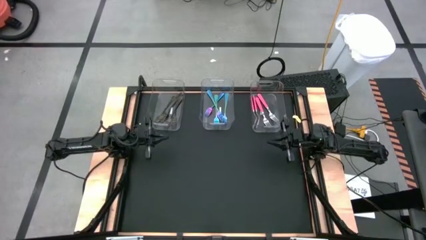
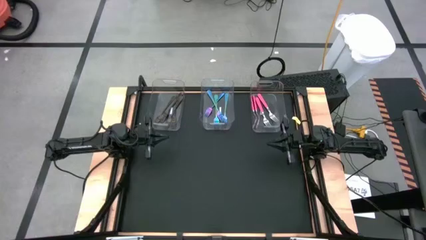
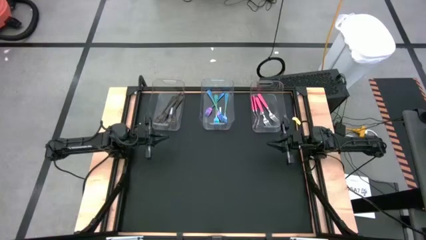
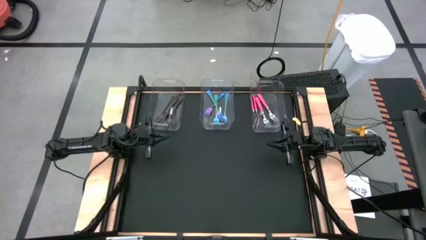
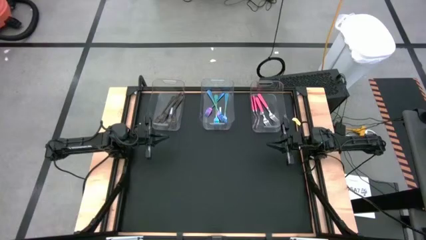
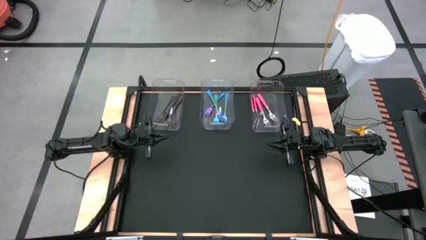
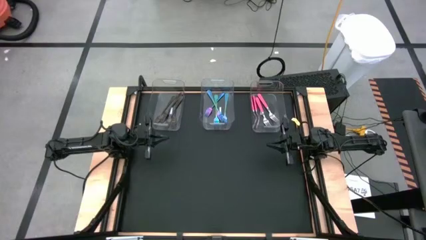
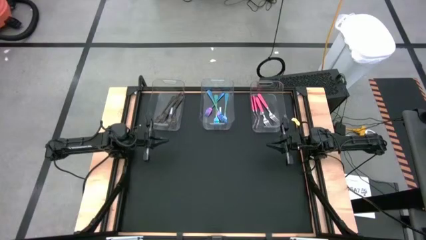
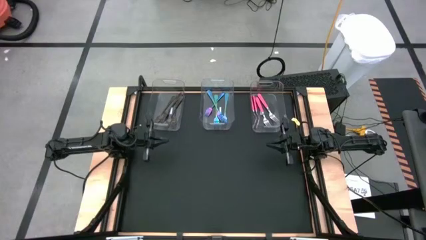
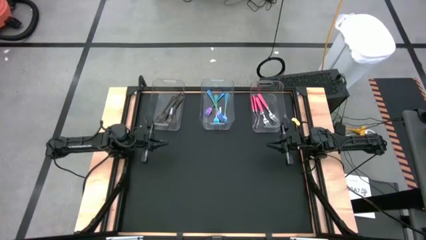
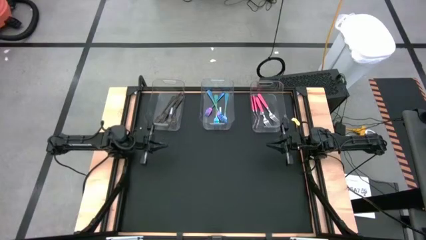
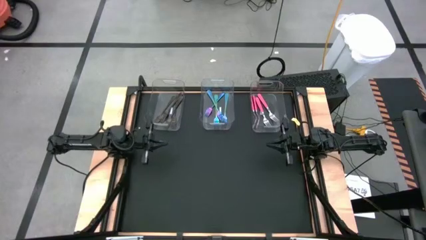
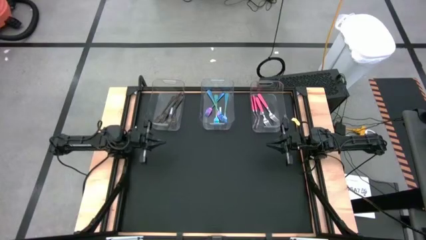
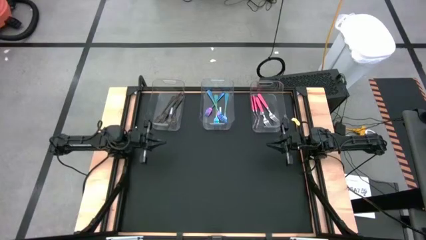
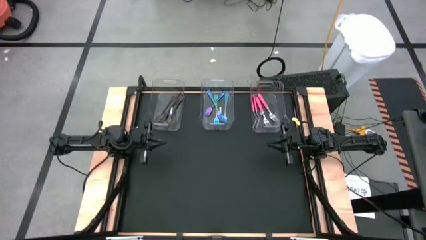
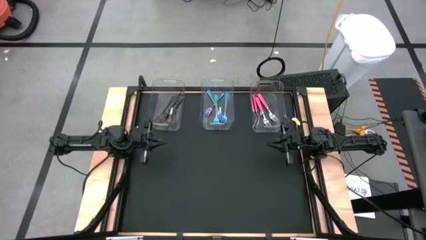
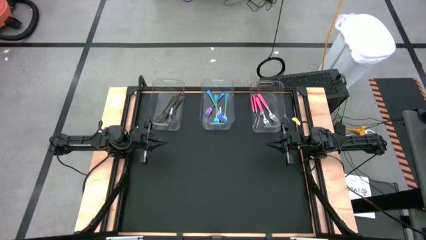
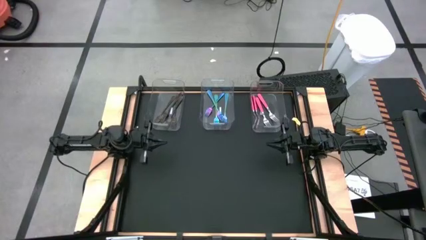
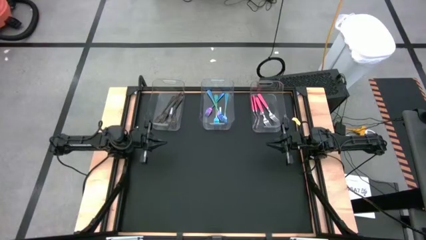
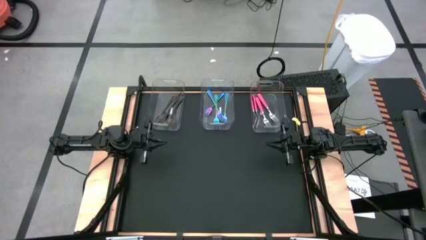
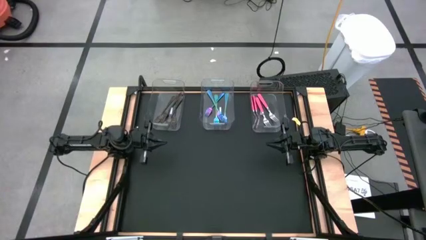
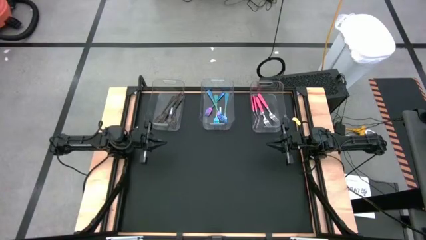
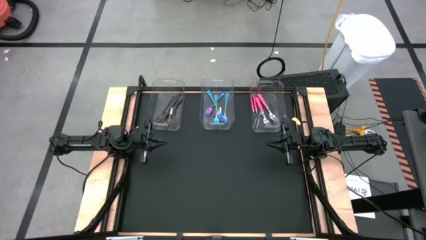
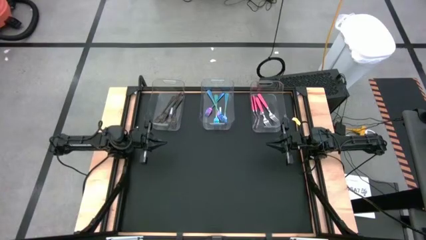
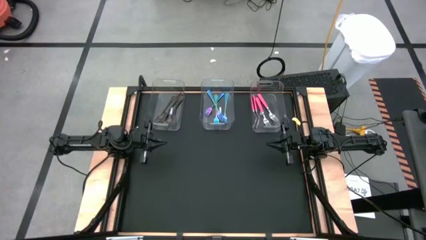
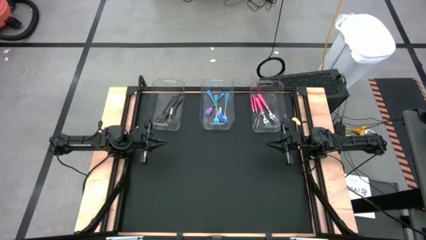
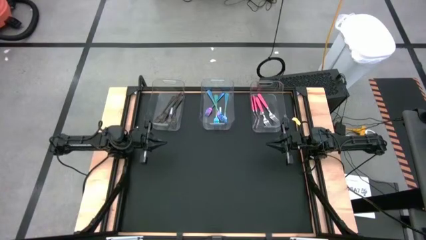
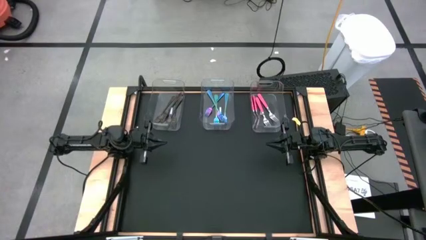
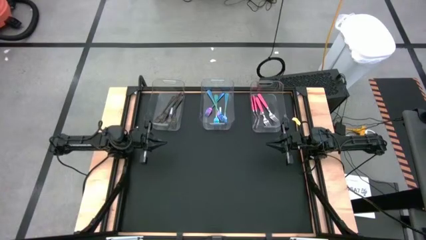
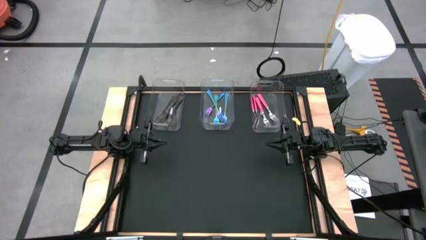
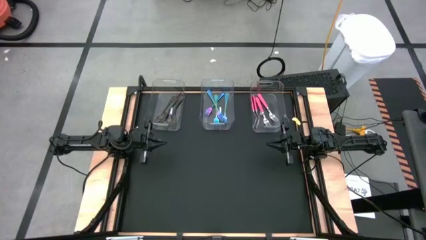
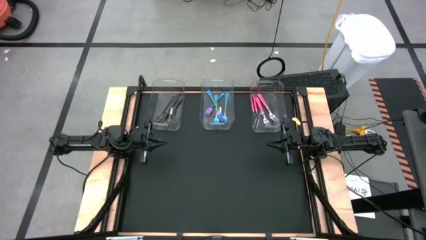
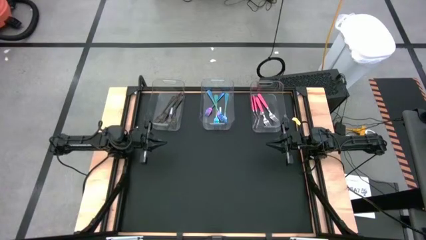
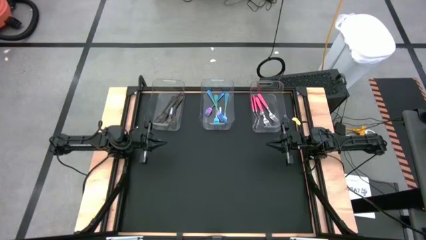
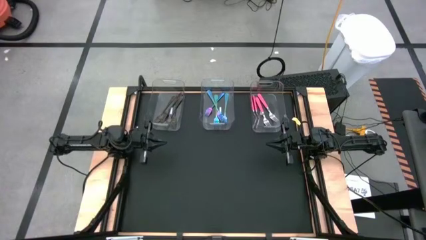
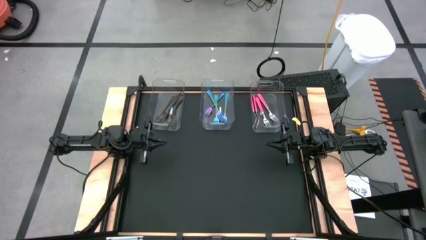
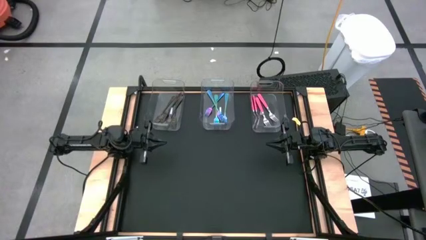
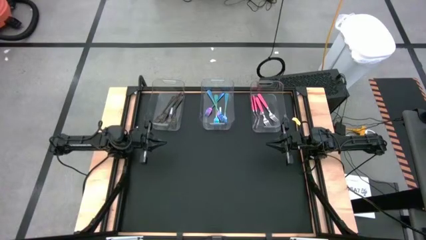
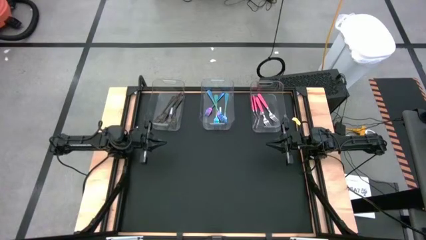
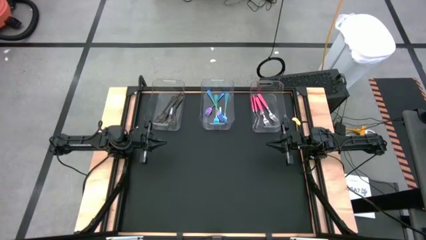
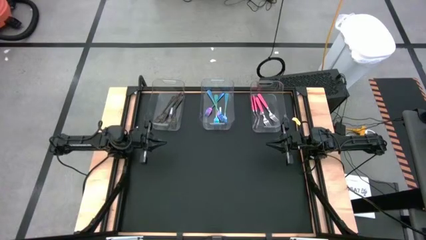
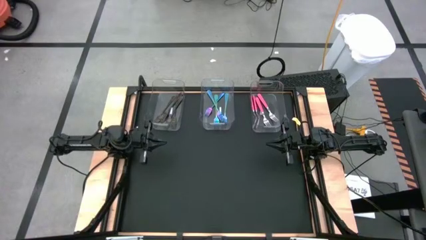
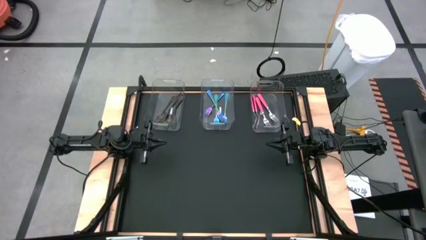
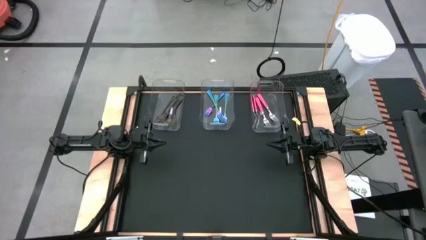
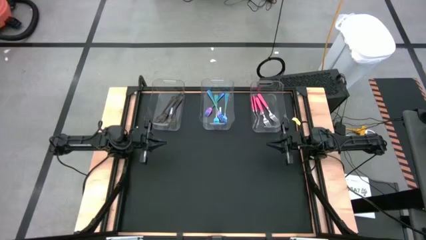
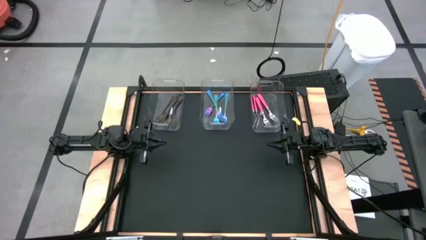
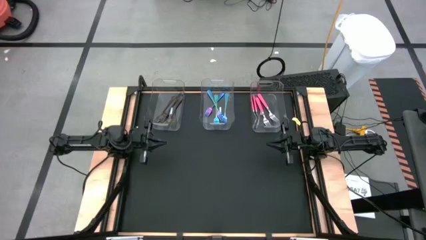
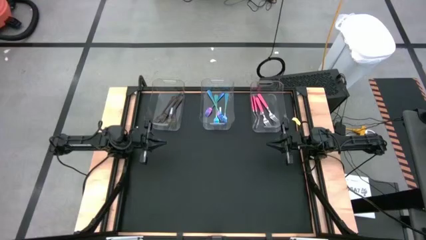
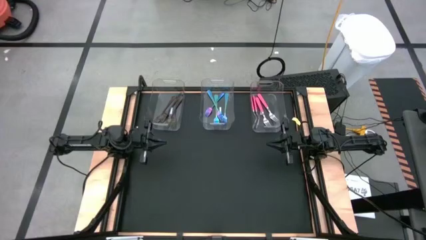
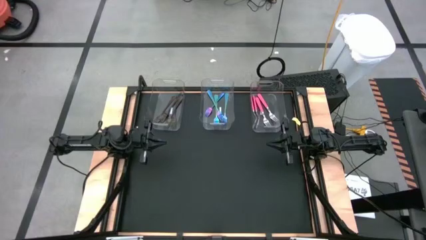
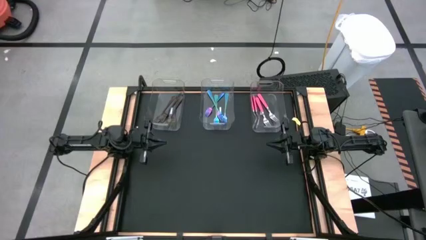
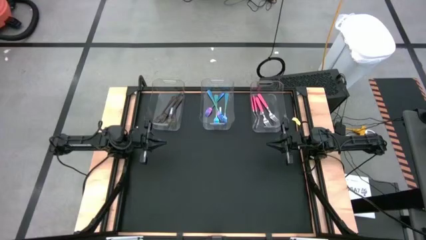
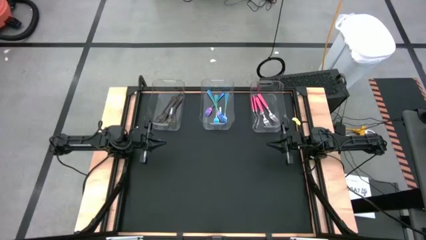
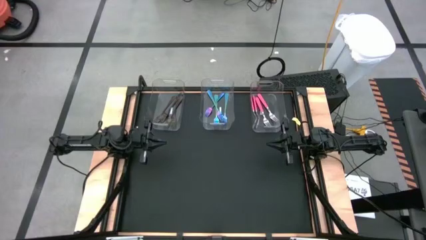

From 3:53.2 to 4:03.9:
Task: Sort silverware by color (type)
Return to Home Position

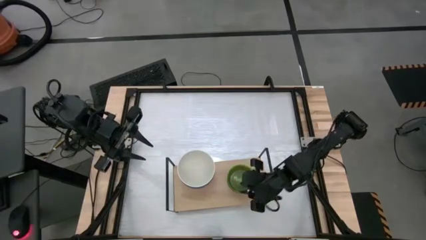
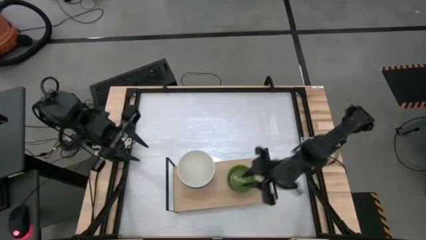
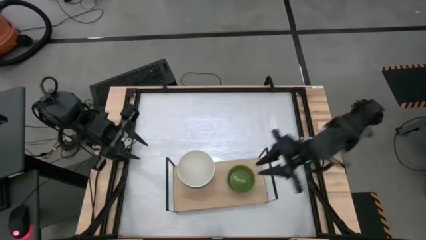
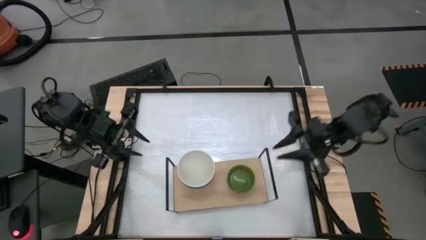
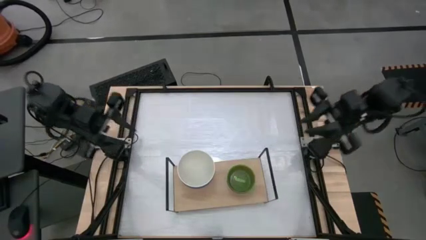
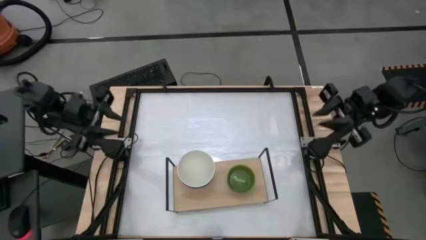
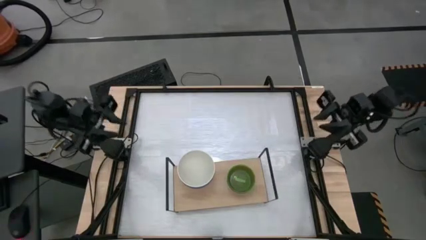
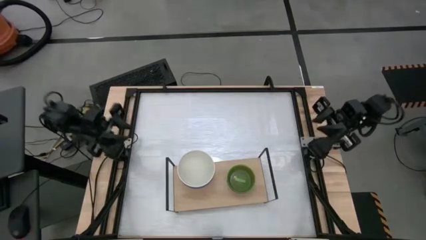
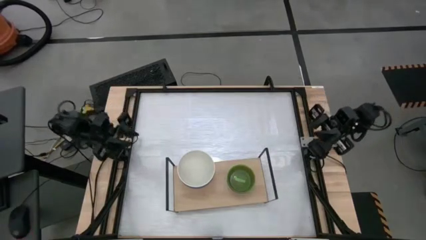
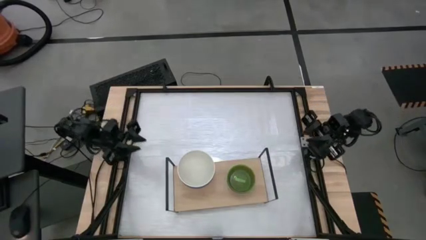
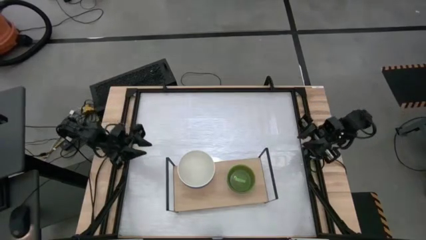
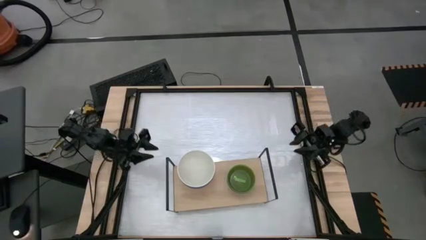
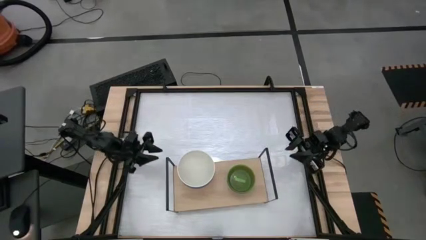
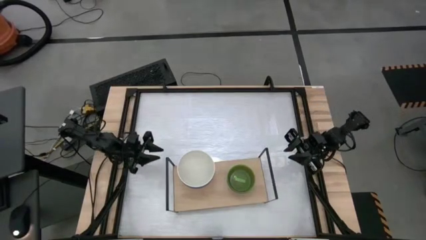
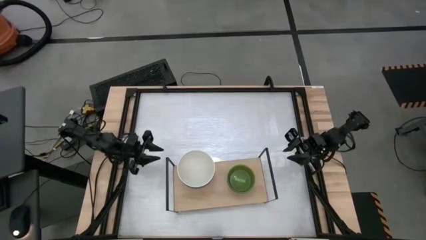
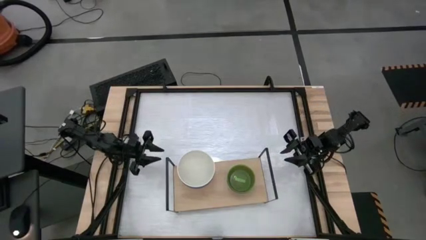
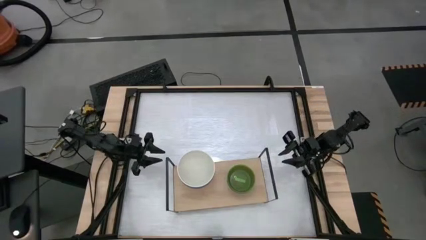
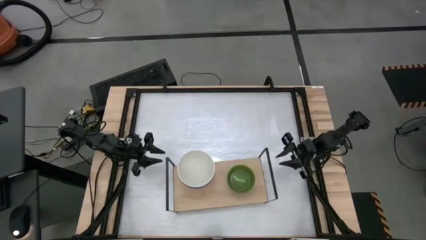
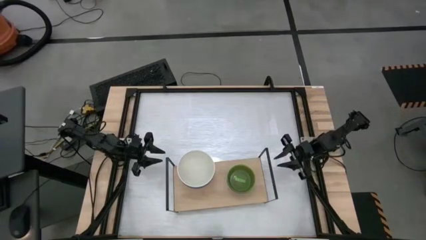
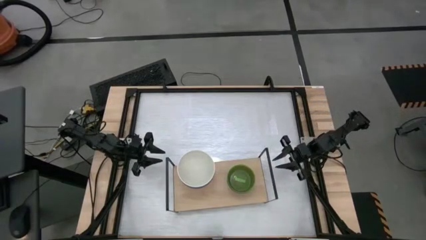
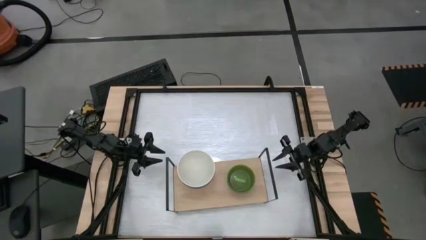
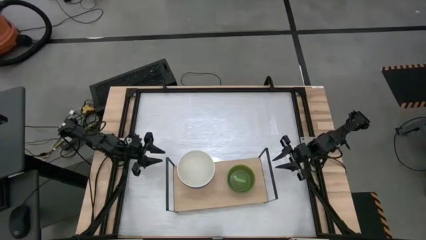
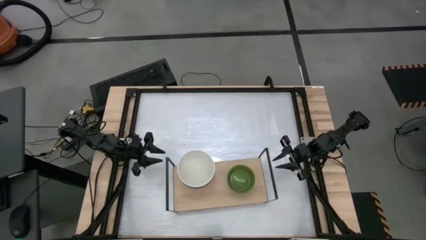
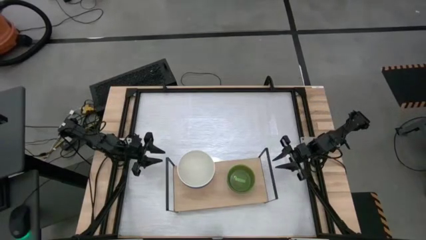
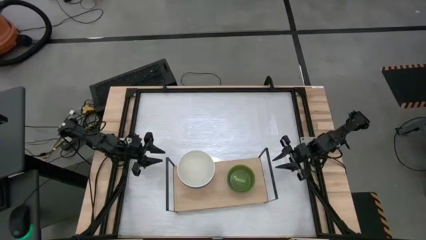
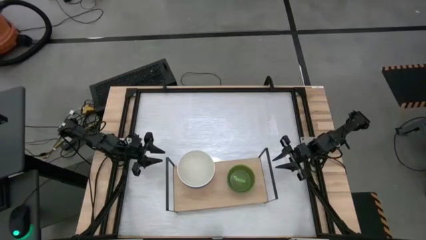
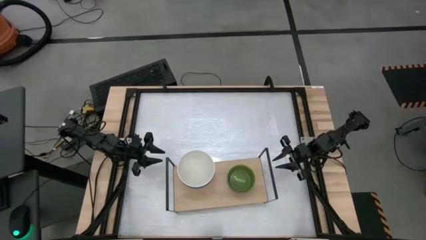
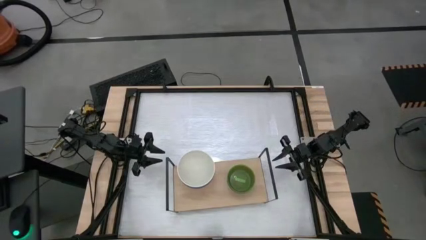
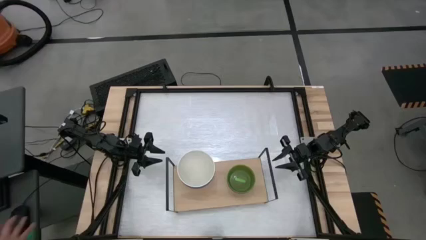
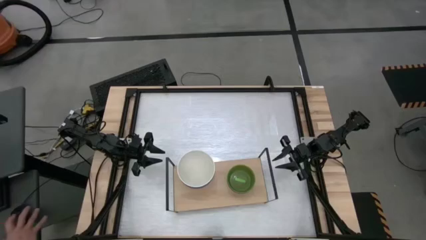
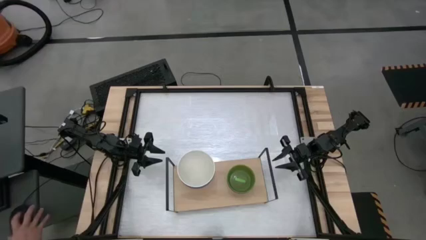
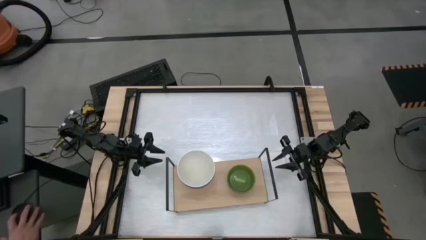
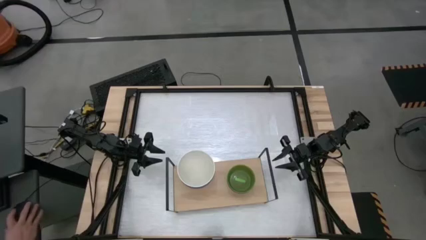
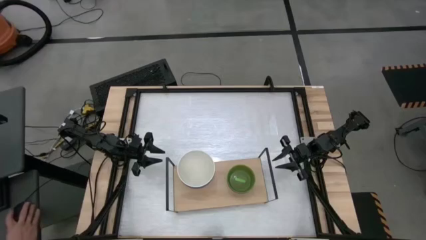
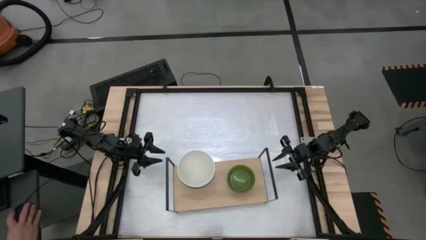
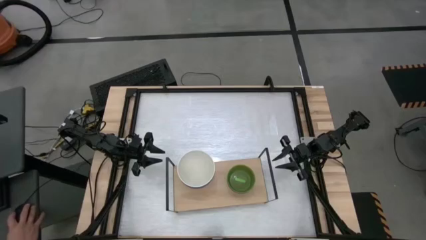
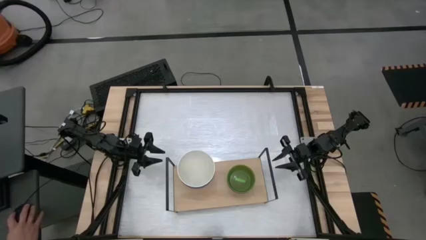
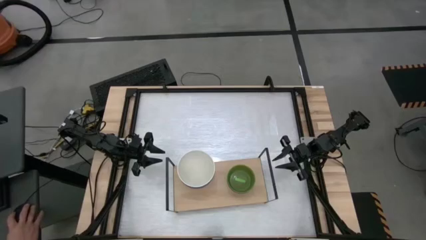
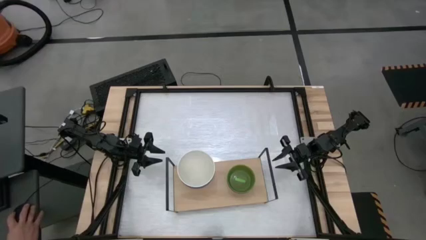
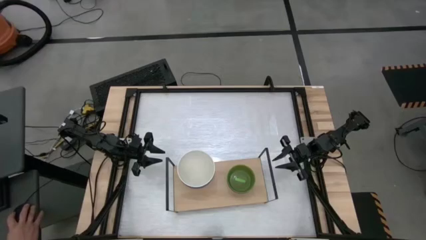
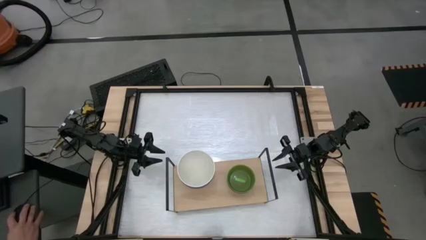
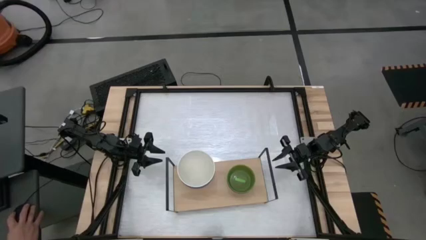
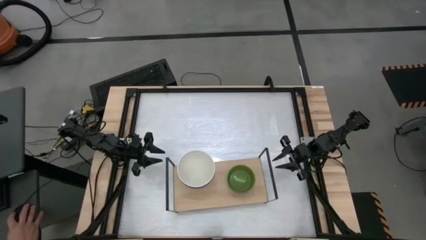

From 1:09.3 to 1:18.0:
Task: Place and stack bowls onto a shelf
Return to Home Position
